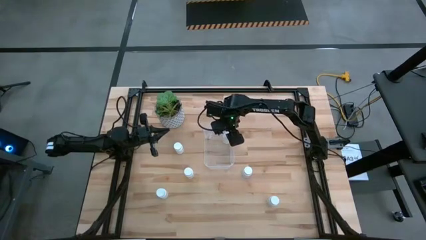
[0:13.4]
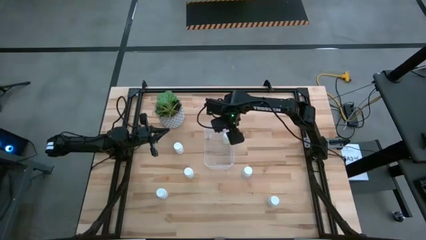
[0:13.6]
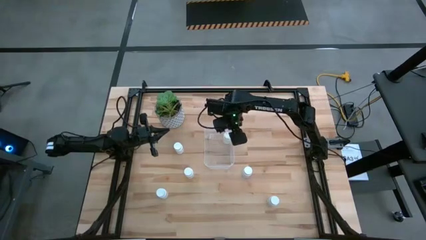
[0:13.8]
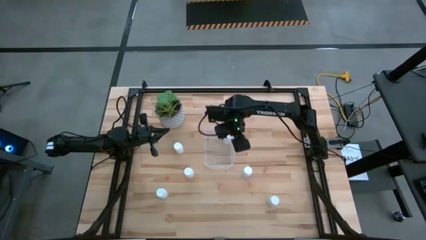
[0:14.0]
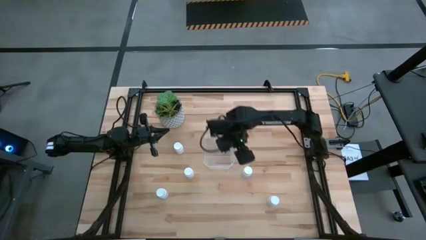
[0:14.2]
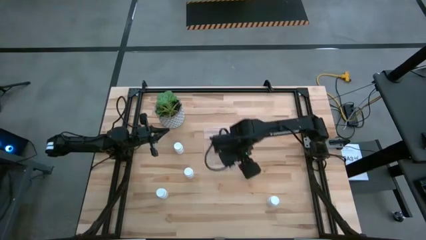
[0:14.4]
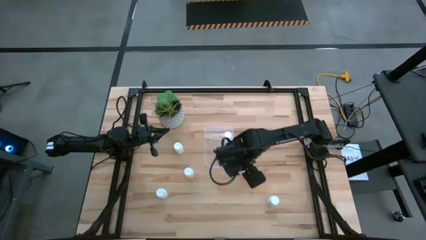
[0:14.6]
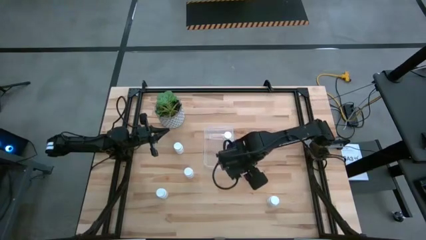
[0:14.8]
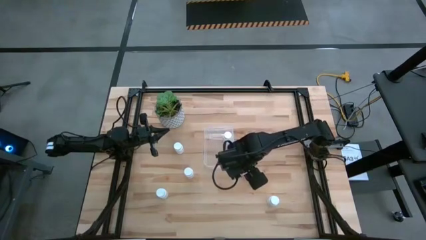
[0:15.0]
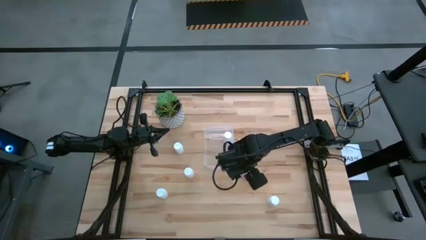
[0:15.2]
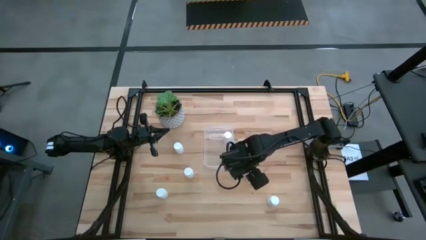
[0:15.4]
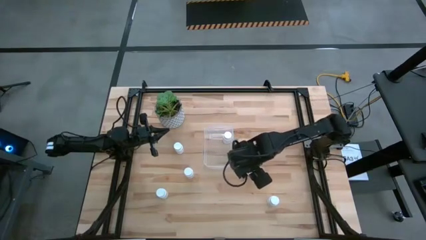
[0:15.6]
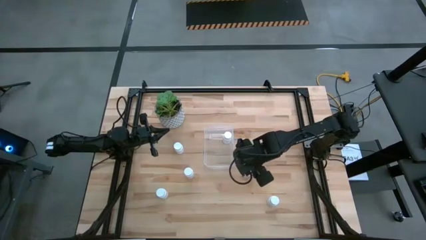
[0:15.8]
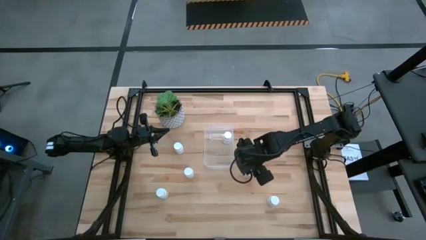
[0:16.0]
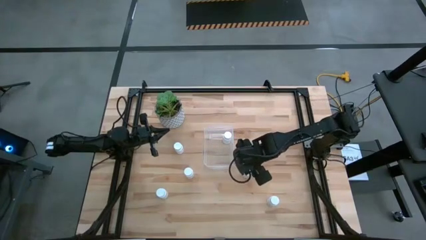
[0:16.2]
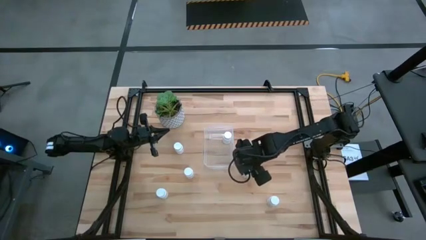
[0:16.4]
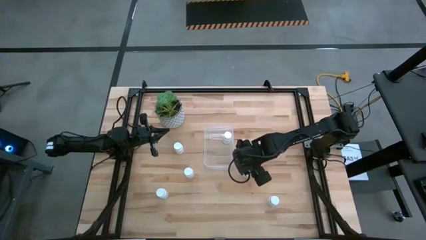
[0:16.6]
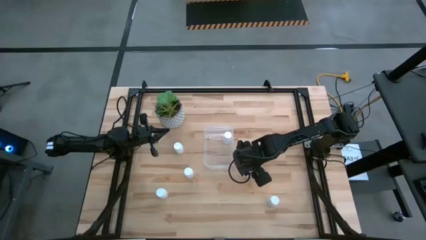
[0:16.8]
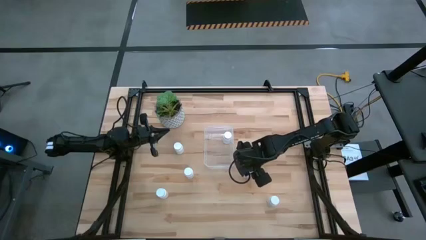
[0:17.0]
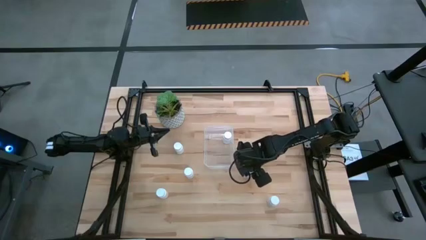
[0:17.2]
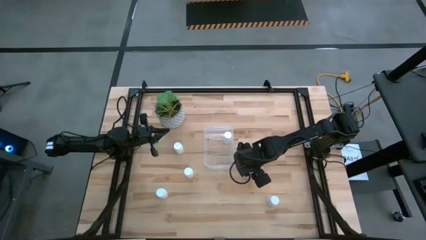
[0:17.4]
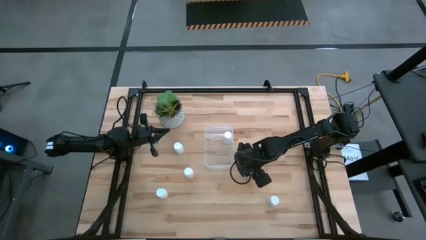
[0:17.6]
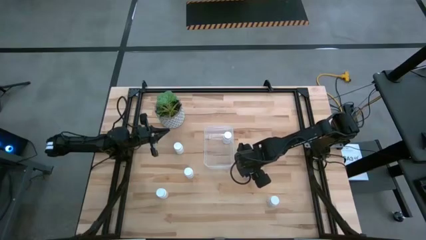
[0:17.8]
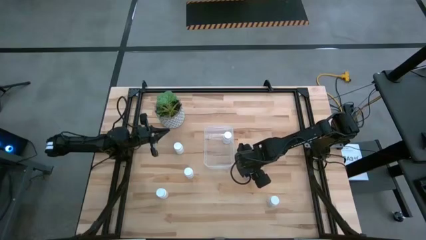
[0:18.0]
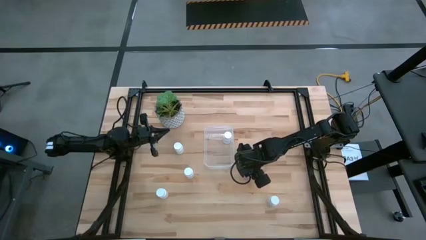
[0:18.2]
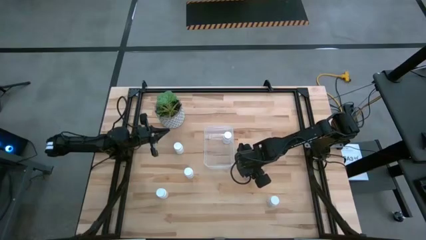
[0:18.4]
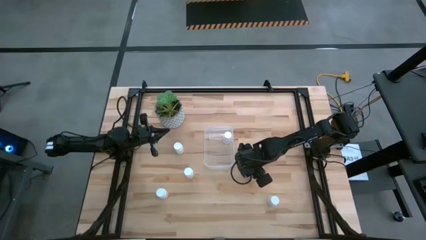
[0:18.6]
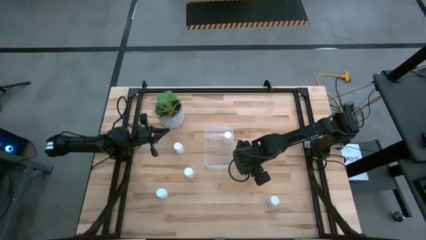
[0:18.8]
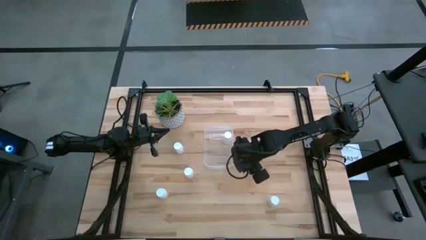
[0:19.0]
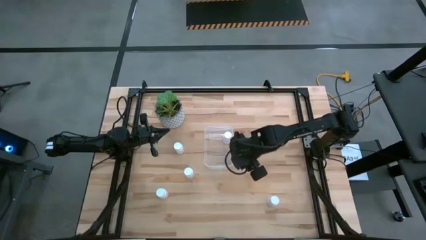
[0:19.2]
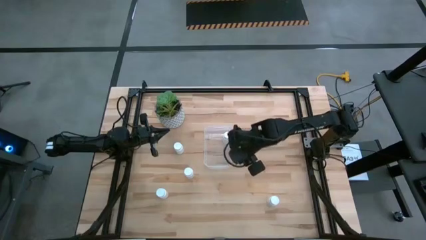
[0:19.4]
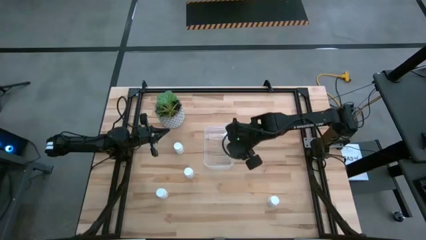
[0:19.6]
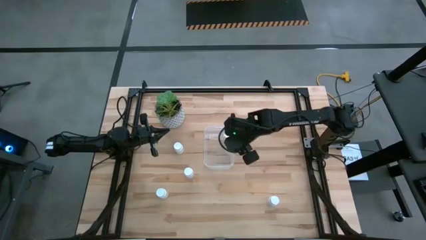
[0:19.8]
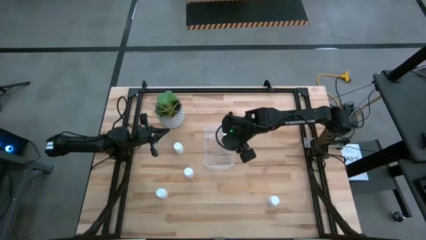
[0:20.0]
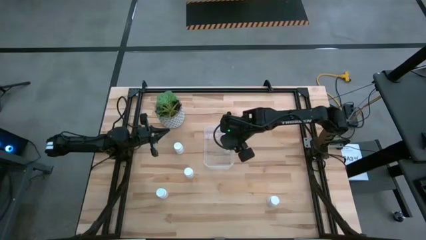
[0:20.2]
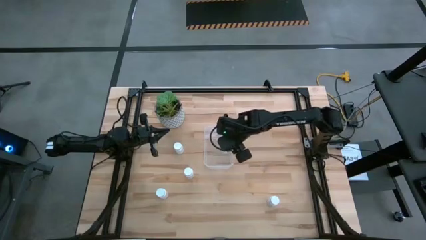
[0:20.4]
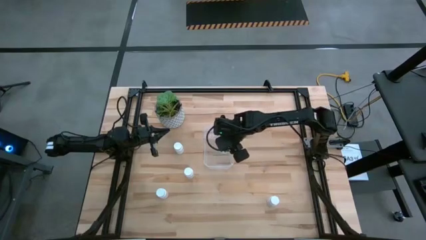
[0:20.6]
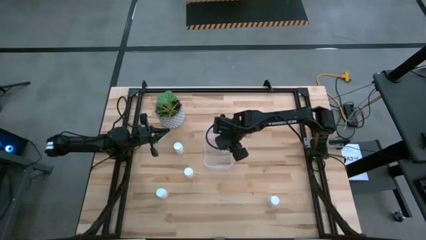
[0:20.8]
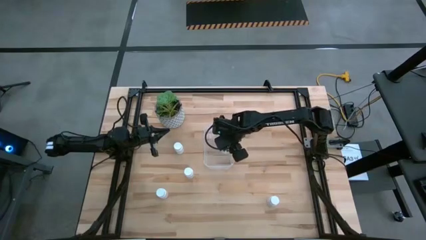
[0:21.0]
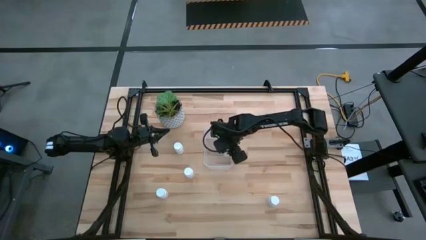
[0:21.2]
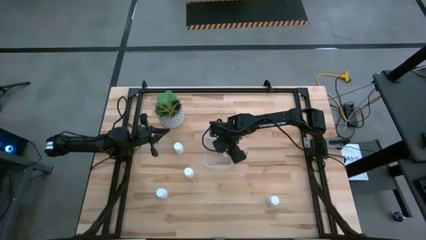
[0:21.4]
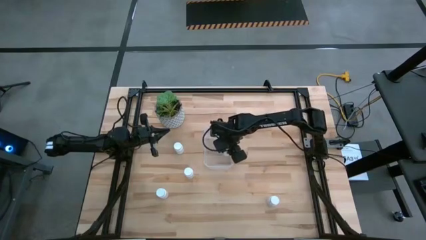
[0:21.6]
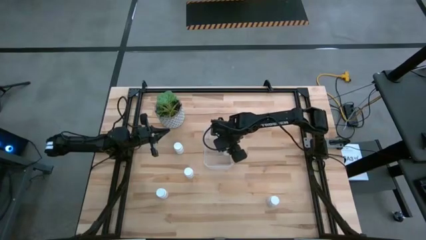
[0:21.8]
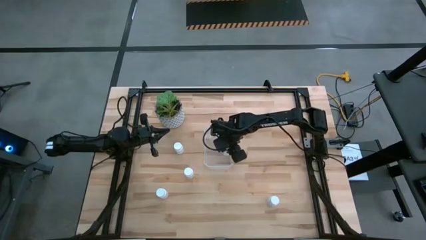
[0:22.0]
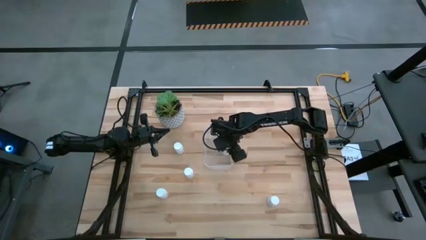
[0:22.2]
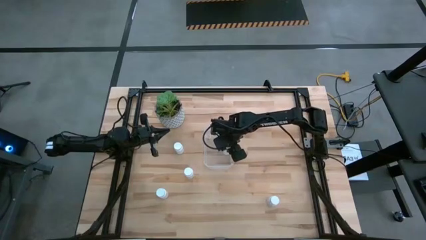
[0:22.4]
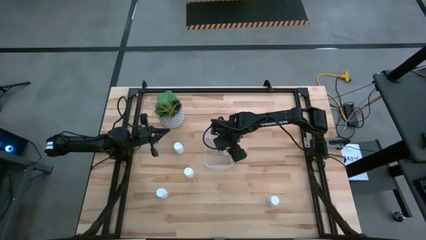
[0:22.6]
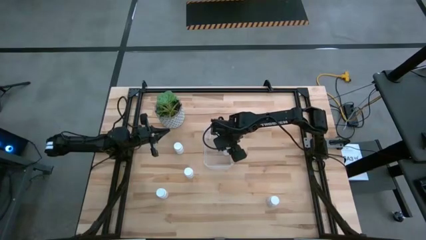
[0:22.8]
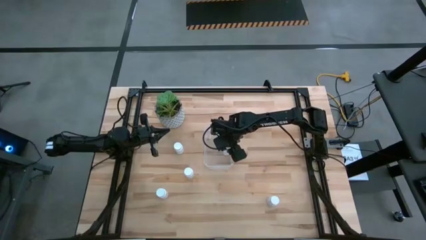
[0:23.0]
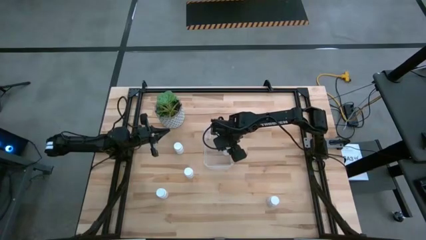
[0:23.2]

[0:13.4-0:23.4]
Task: Pick and place pill bottles into a basket
Put the white pill bottle into the transparent container

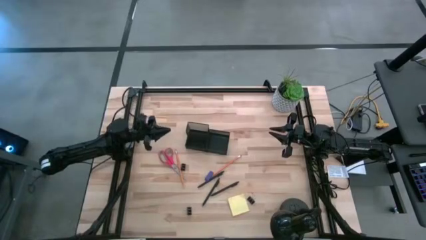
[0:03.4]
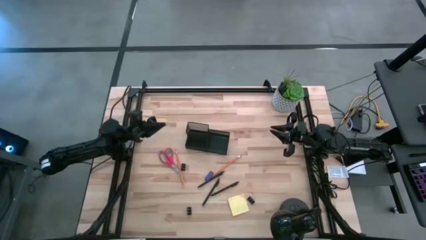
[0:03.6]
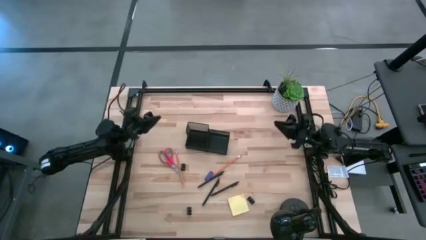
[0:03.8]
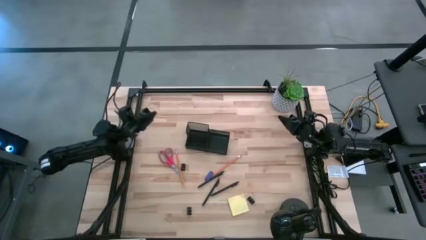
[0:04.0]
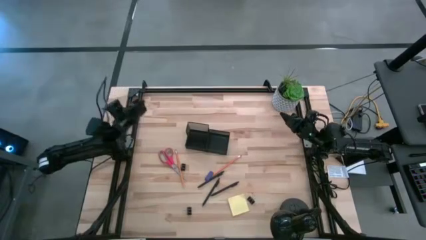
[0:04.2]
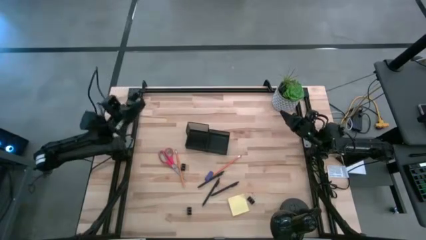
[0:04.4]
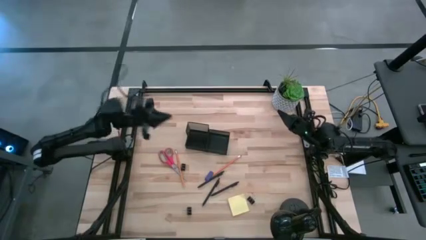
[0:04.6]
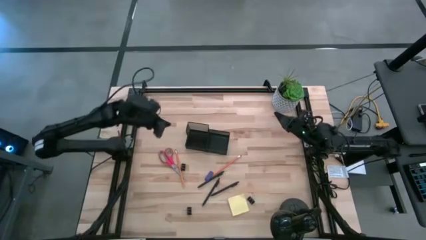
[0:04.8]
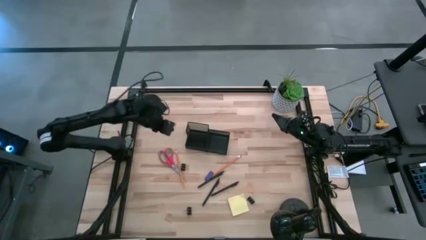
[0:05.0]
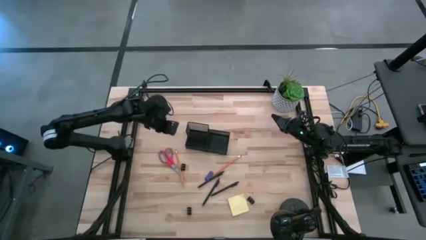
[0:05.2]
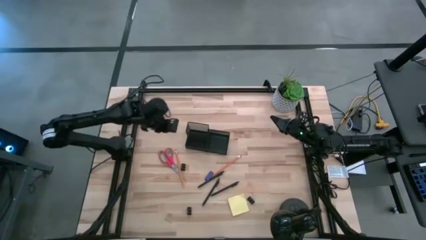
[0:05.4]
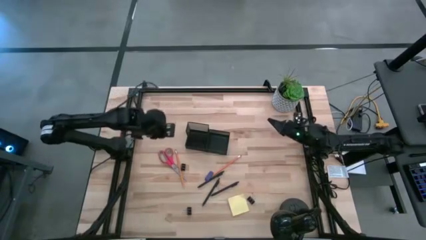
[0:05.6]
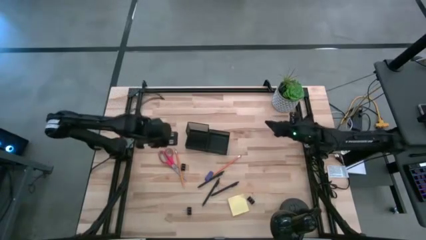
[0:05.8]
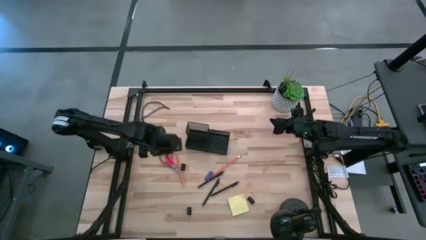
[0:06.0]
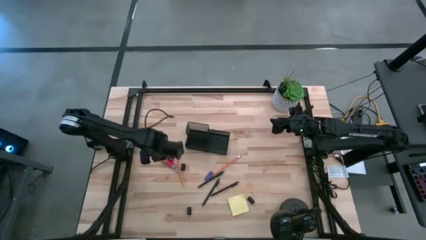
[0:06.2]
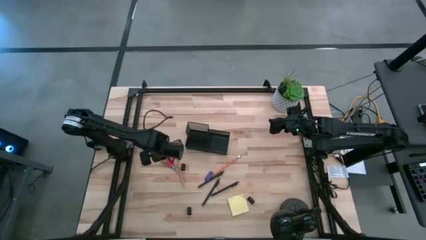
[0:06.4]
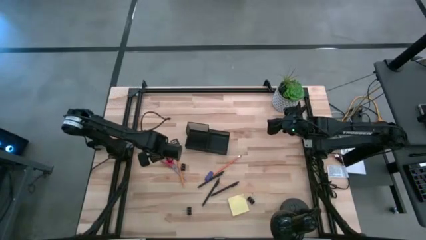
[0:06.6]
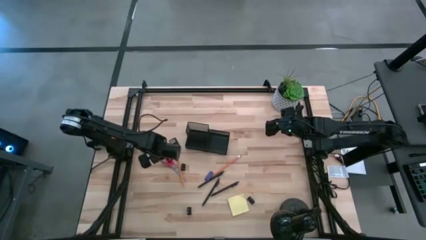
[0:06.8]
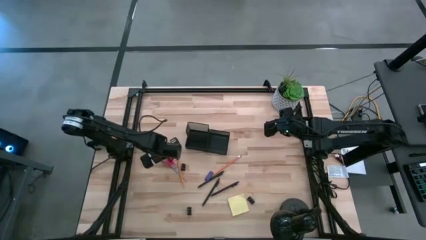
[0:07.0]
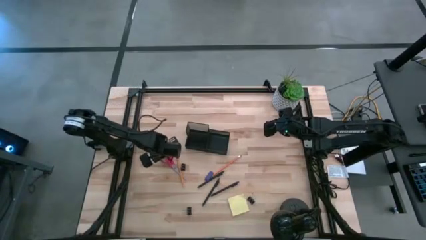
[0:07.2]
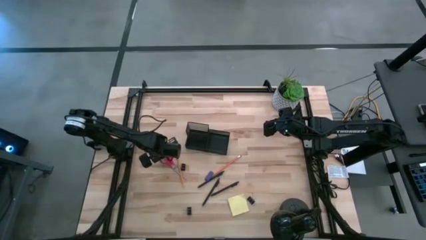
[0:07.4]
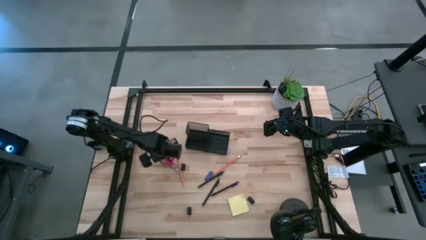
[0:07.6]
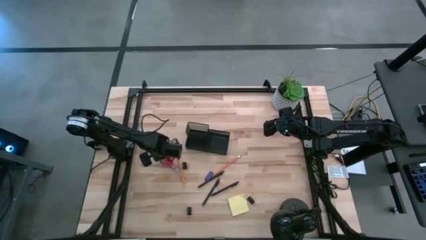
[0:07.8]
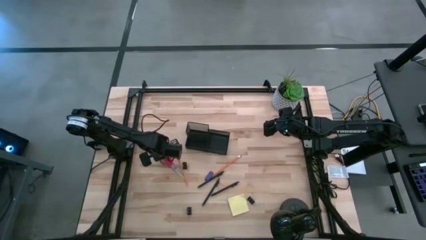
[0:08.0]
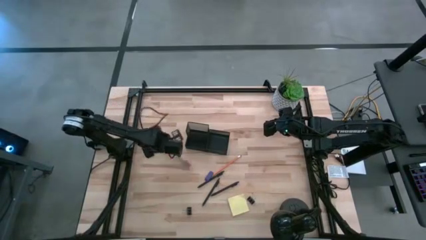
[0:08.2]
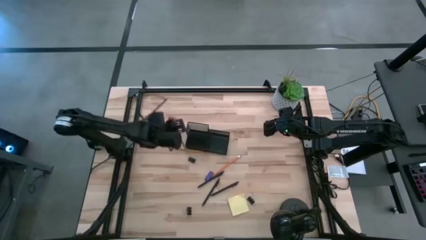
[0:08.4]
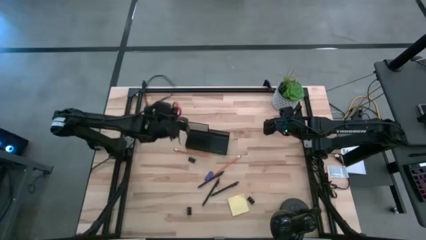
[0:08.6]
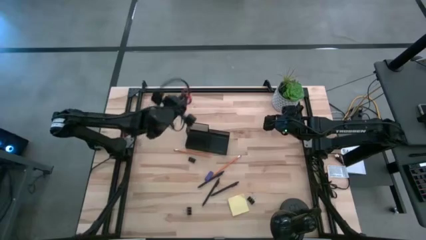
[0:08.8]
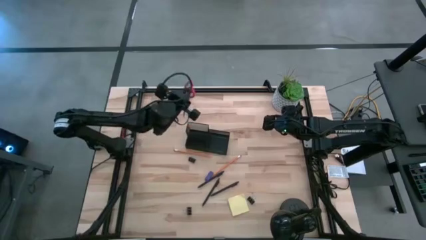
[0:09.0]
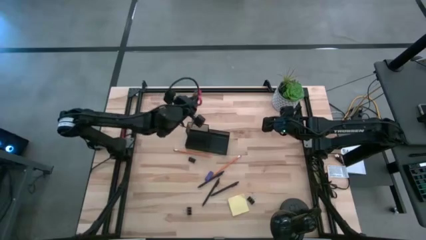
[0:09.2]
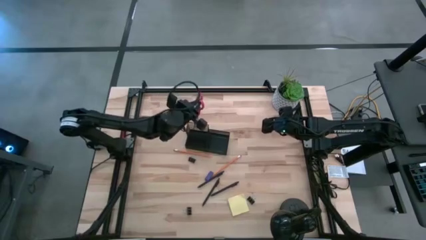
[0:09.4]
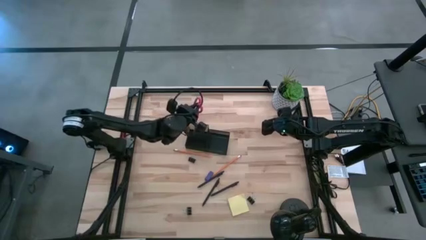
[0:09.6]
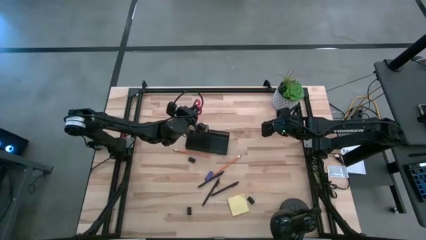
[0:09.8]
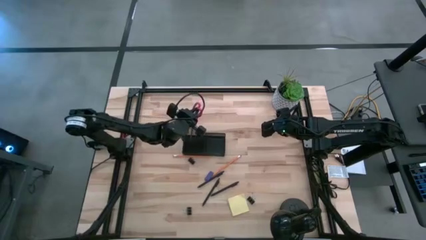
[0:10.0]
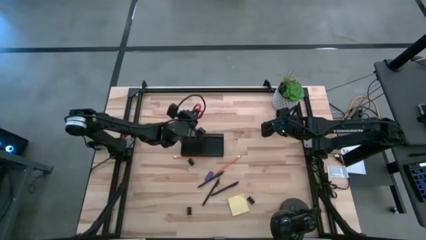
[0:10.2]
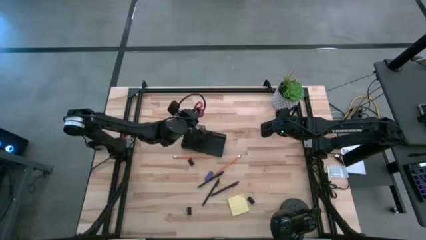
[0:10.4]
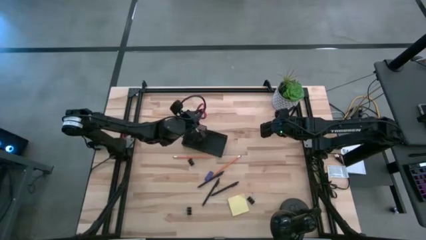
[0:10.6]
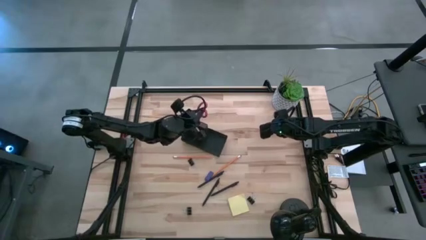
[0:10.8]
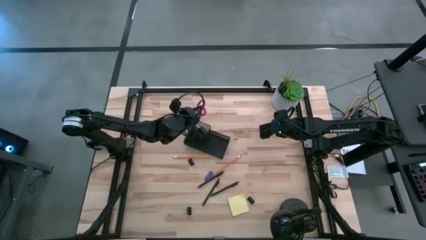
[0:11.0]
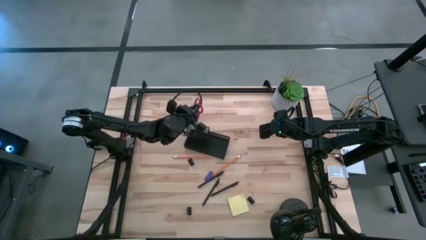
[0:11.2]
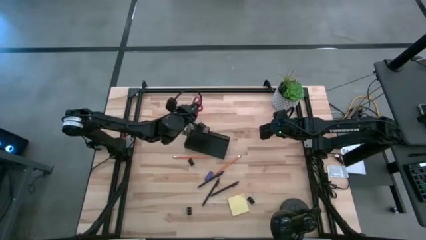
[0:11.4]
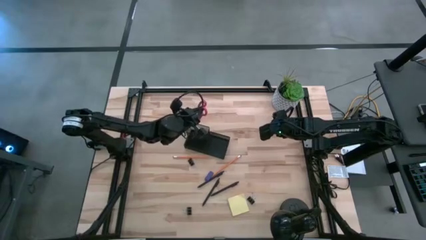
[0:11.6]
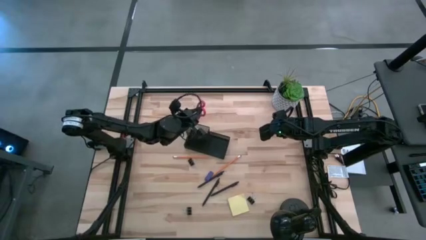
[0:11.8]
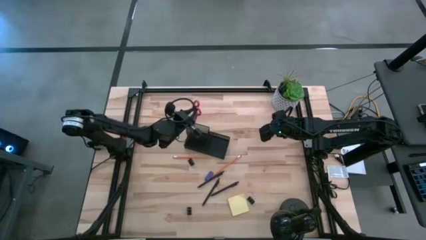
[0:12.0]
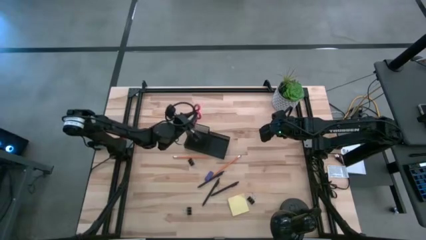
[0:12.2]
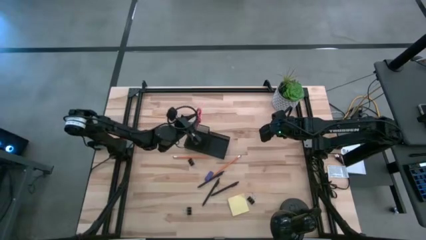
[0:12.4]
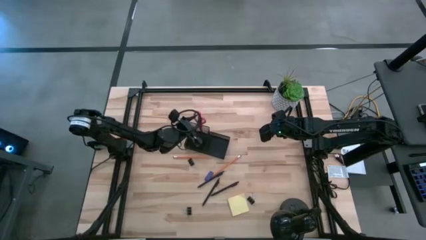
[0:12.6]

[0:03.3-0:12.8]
Task: Pick and place office supplies into organizer
Put the scissors into the top left section of the desk organizer
